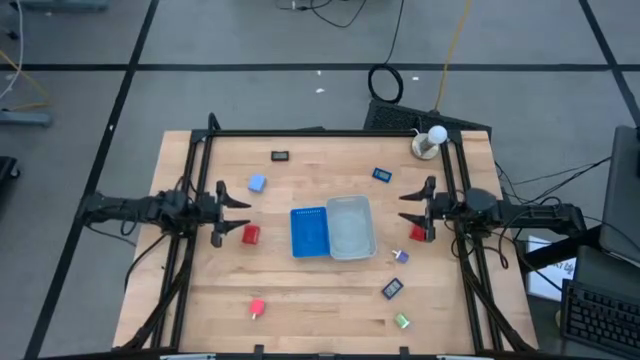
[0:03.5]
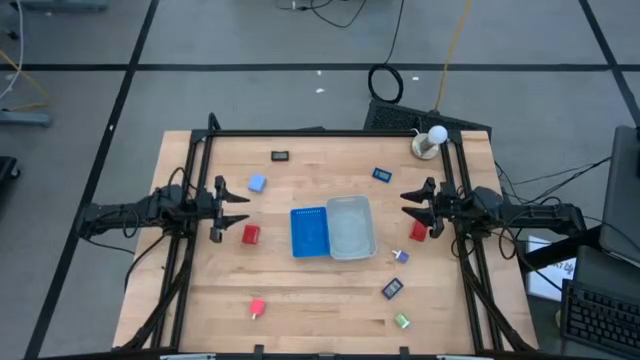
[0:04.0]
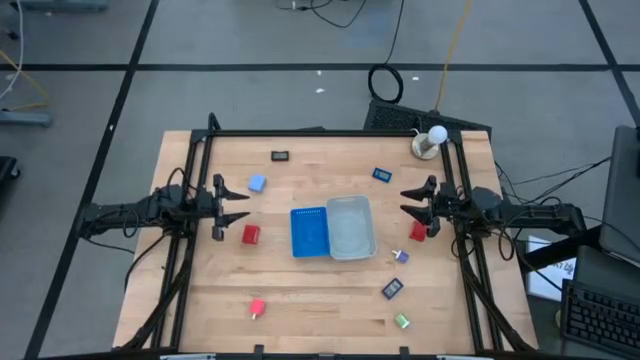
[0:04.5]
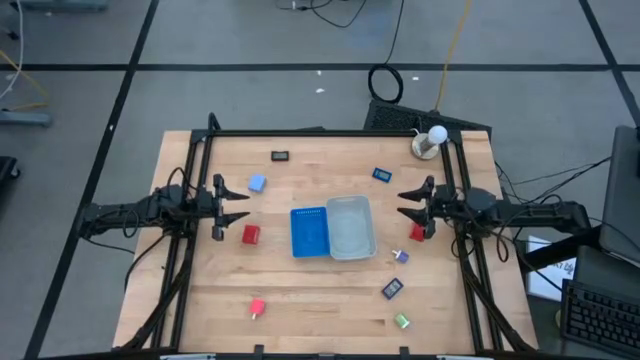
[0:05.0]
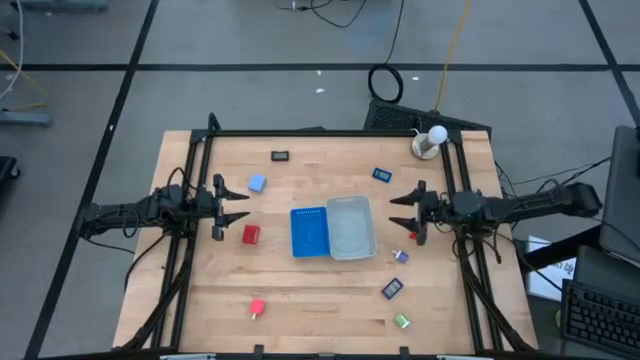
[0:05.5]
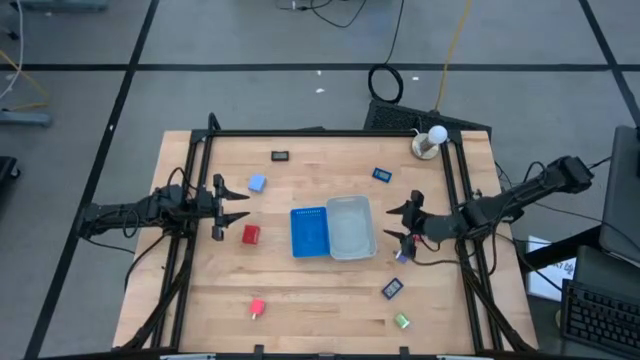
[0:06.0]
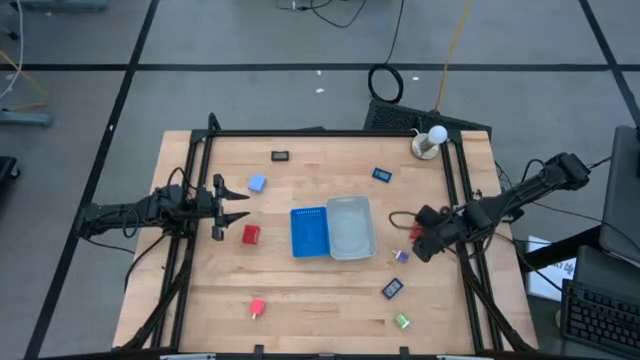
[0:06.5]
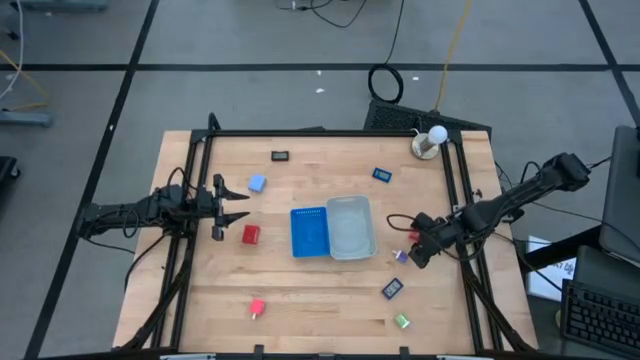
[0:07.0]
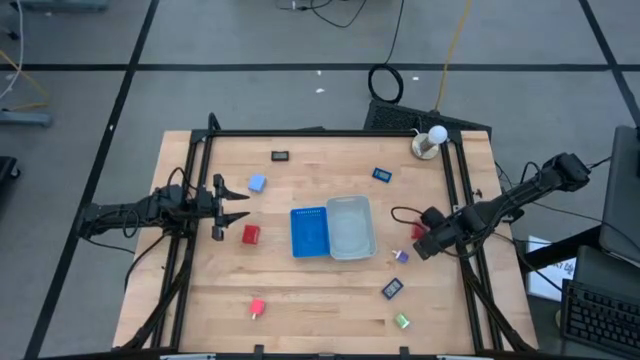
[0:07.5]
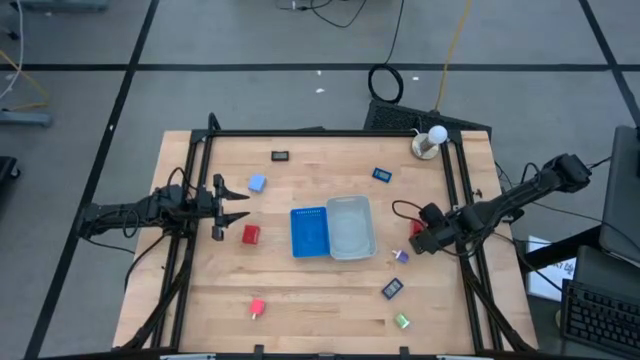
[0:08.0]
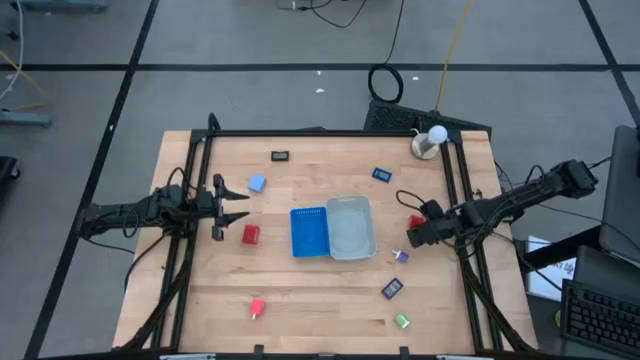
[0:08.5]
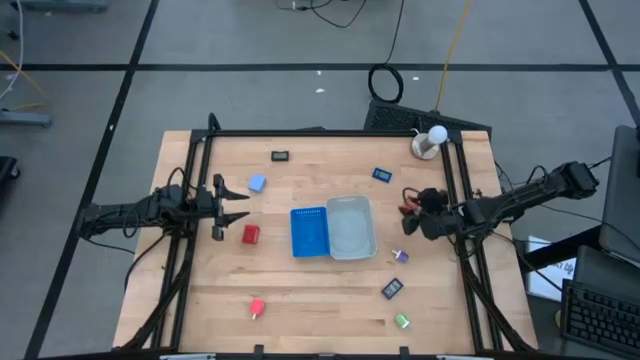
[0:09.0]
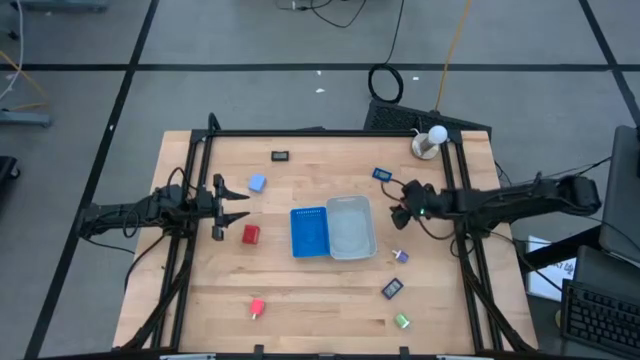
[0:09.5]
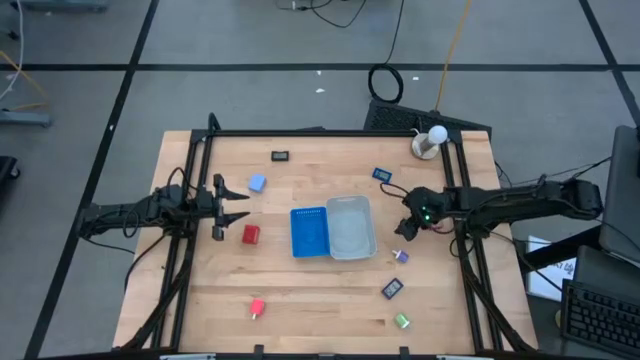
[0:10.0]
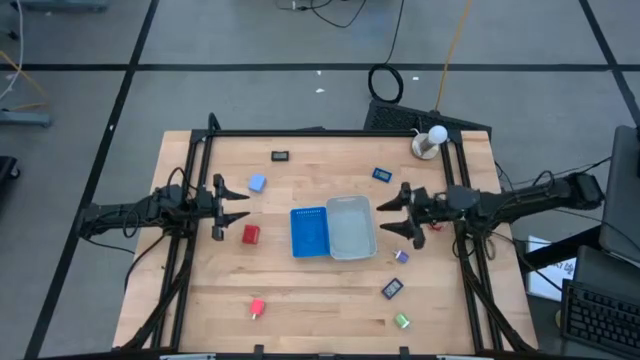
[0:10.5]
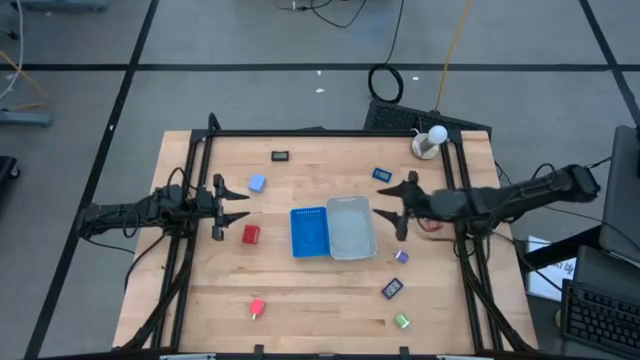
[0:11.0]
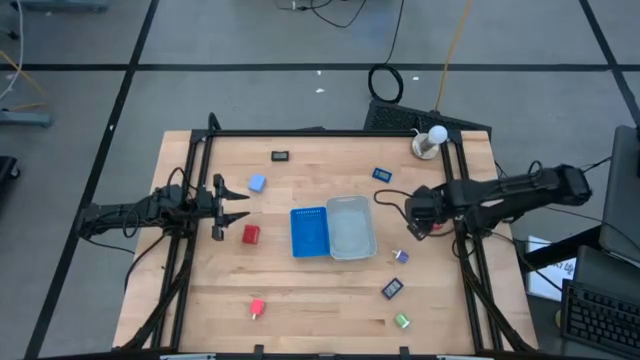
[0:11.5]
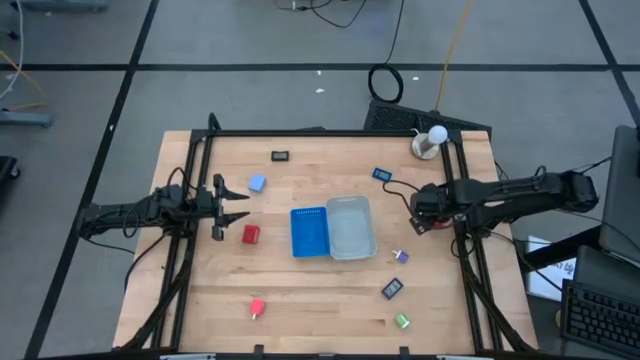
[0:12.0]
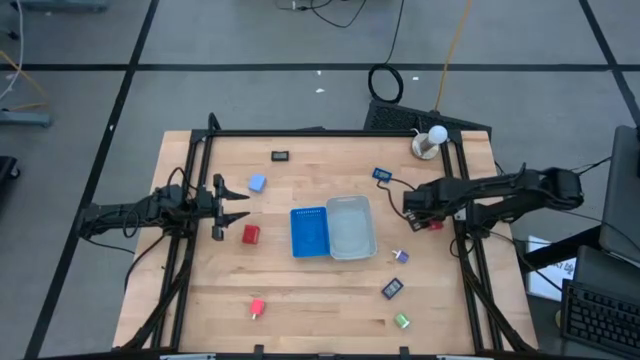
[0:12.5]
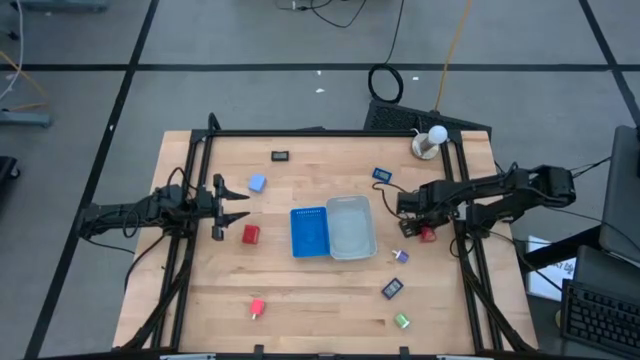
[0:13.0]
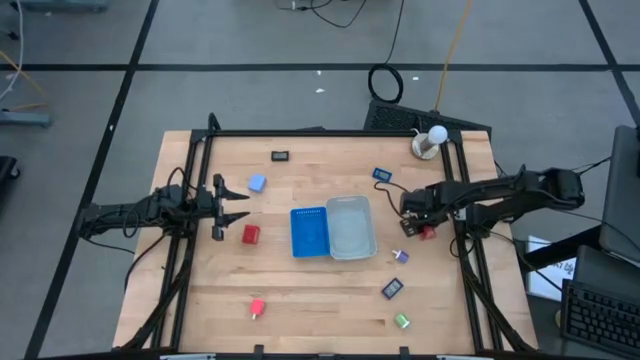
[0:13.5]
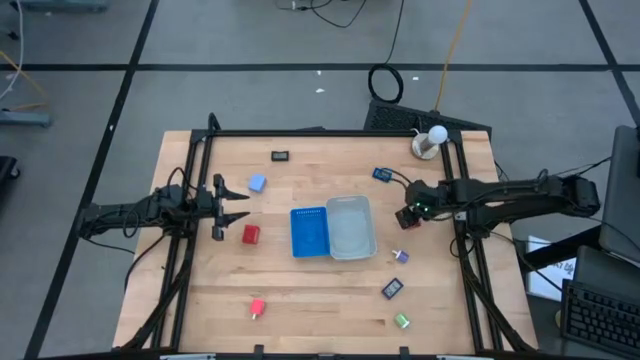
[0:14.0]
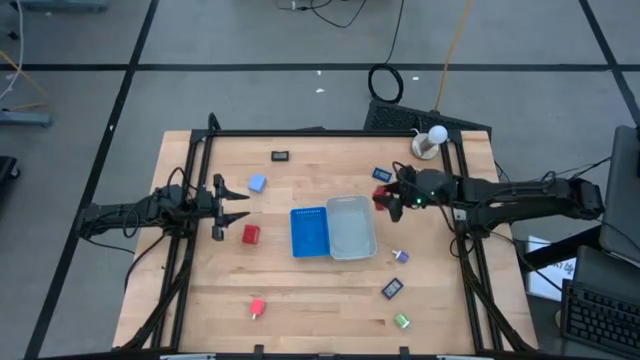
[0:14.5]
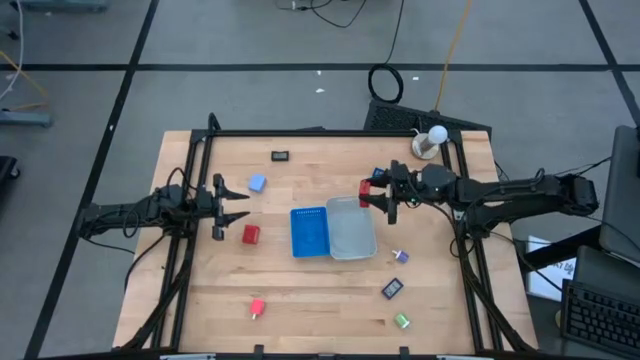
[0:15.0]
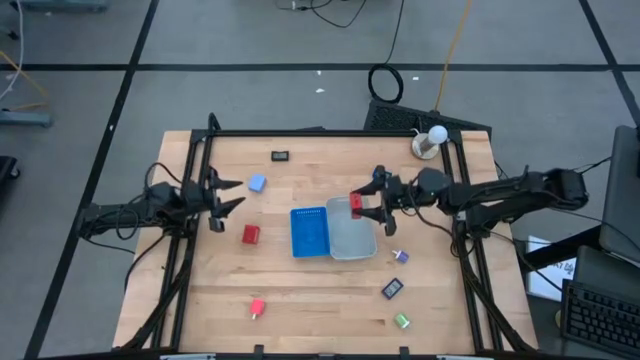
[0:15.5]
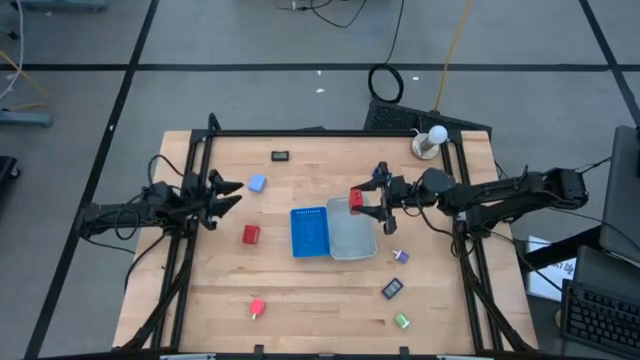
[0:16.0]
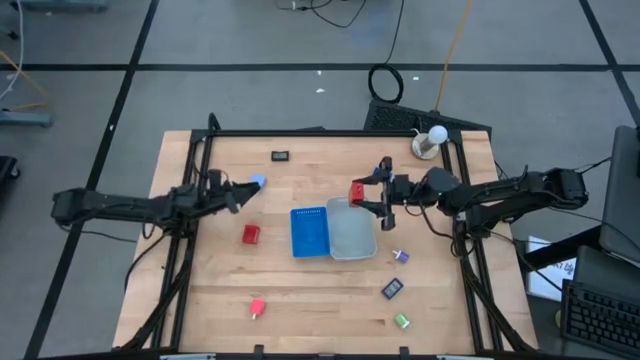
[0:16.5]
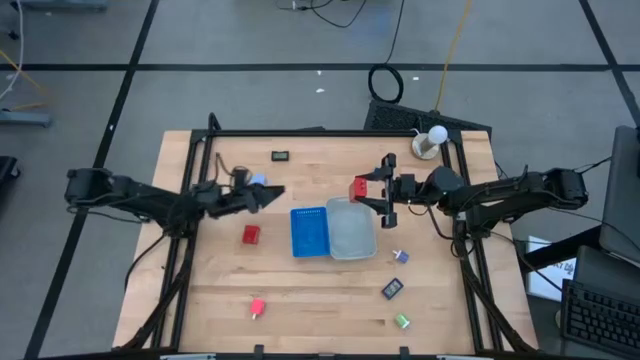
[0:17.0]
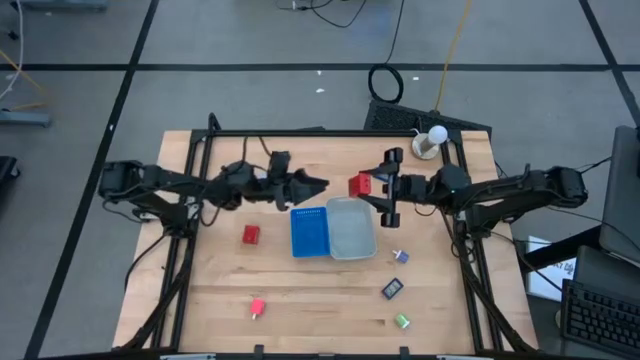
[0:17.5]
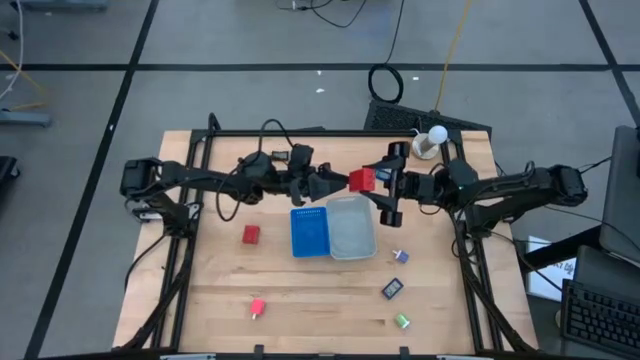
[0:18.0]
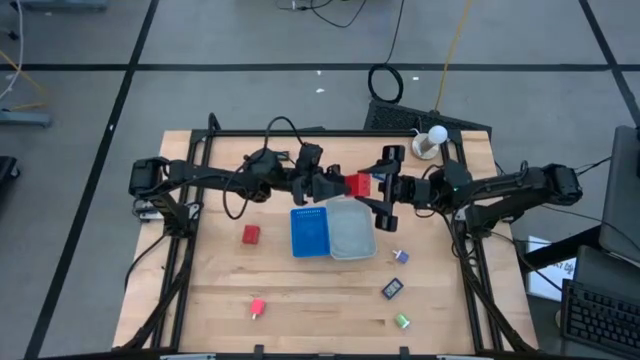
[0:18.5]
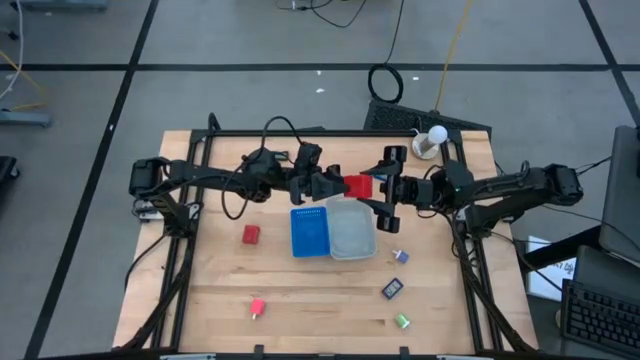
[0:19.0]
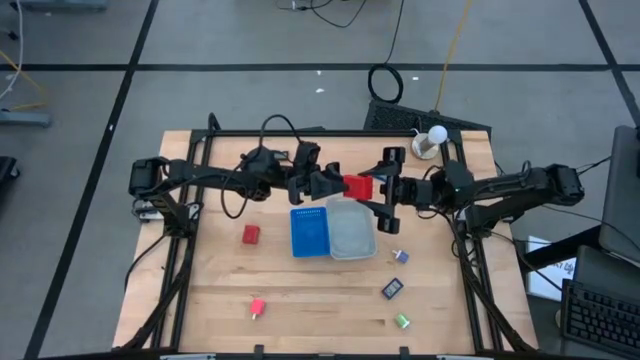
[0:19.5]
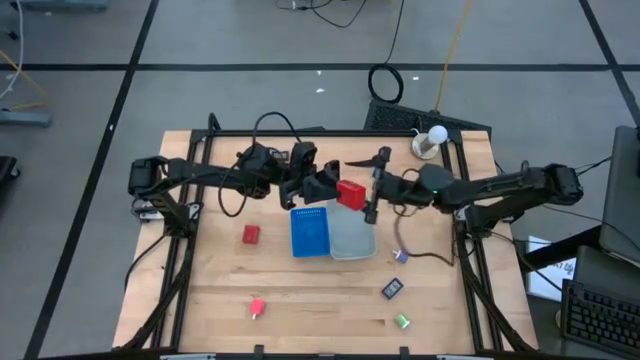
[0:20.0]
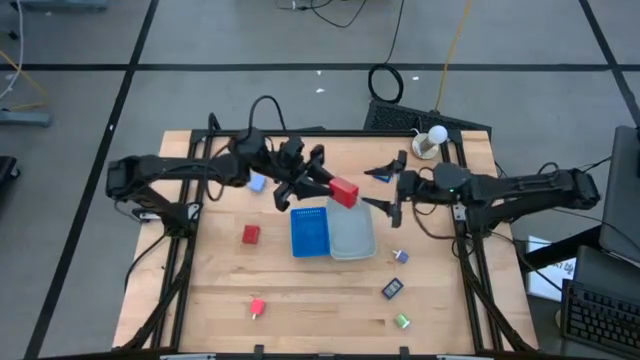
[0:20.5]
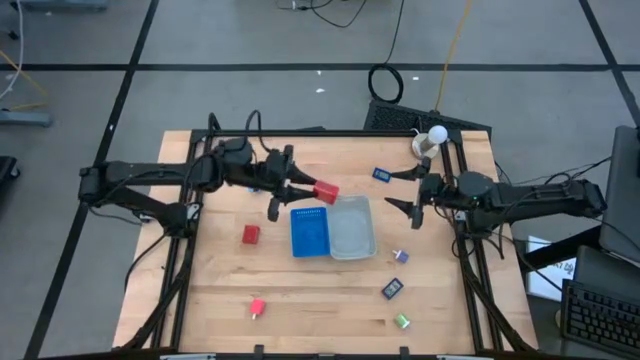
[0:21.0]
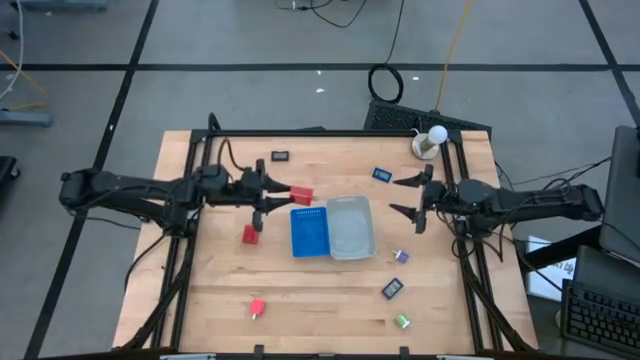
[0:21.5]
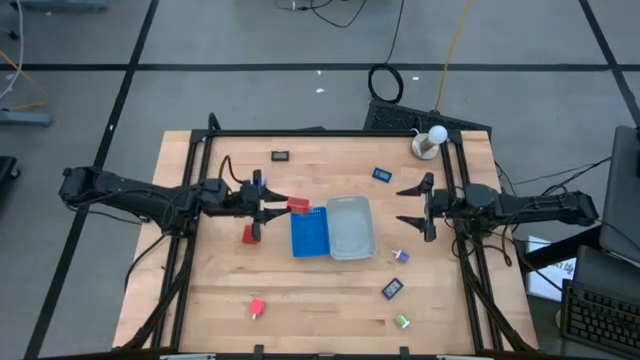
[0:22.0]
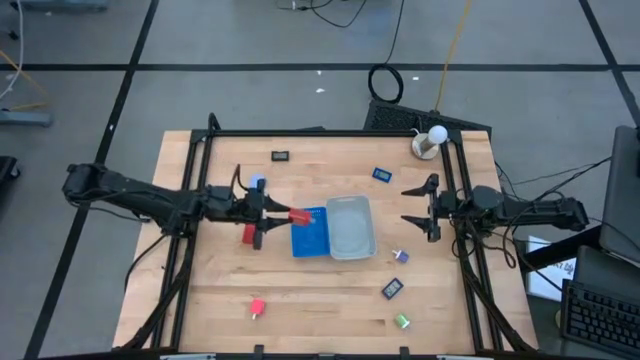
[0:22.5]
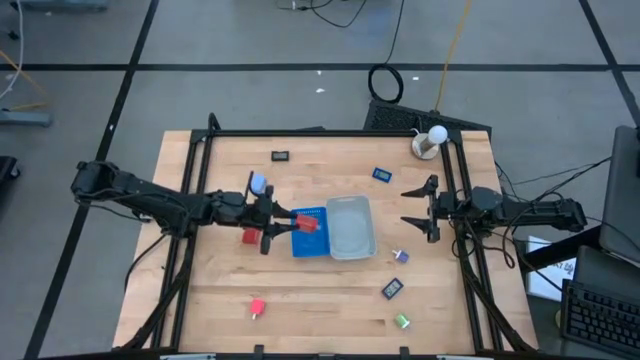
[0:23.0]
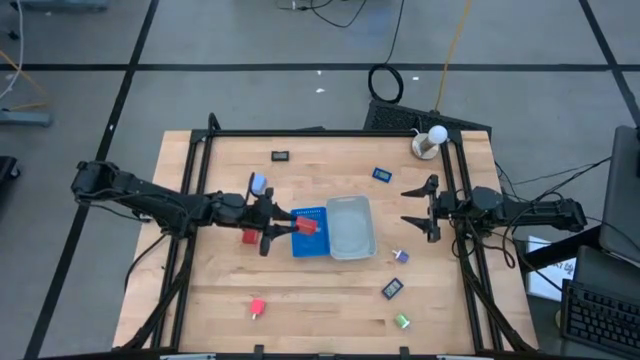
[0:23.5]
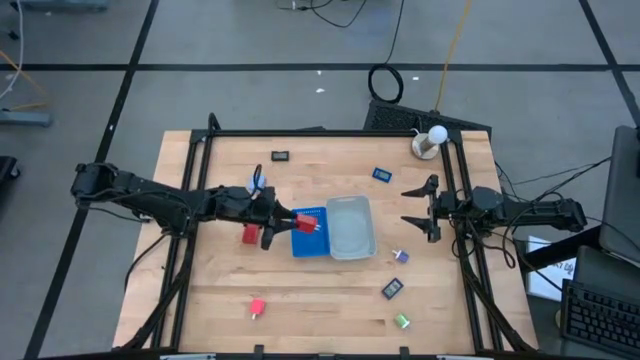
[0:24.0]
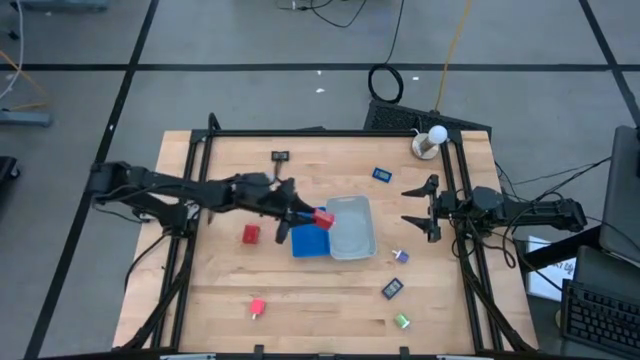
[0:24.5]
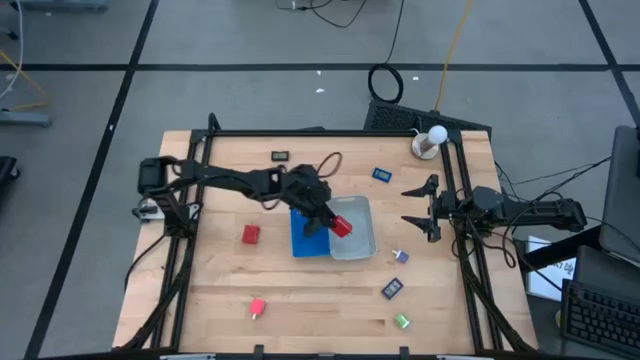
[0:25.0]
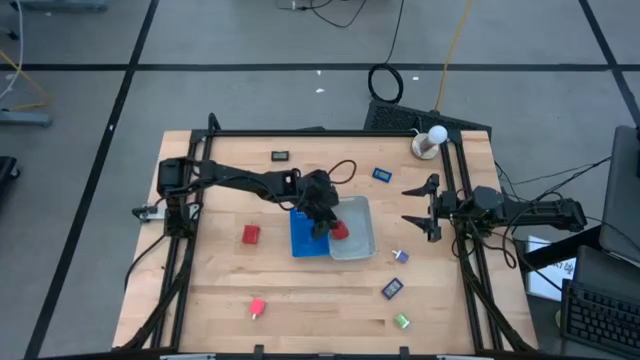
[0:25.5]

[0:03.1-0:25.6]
Task: Pick & Place Office items
Put the right red charger adapter into the gray bin
